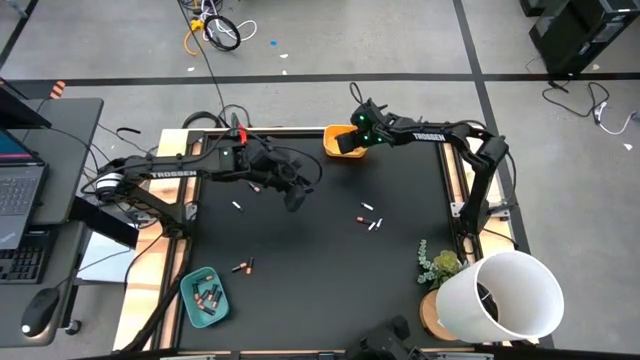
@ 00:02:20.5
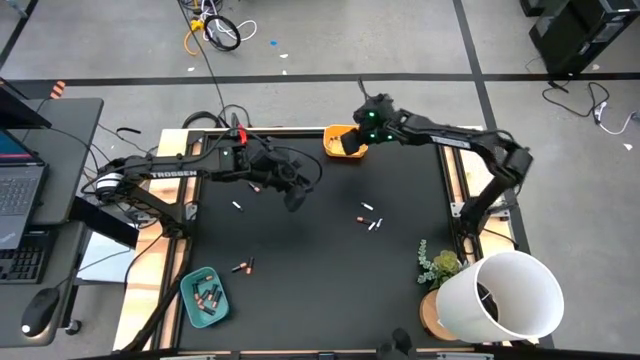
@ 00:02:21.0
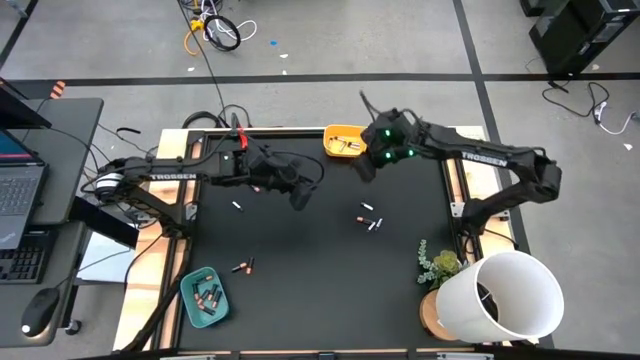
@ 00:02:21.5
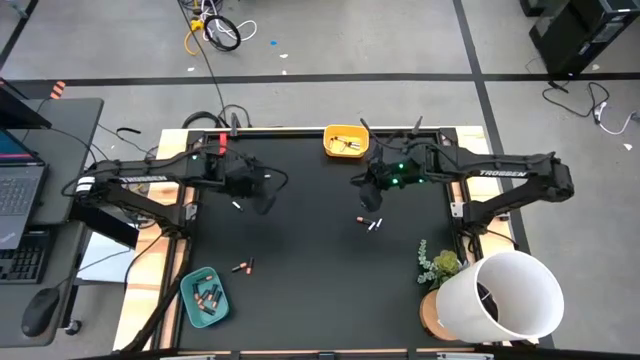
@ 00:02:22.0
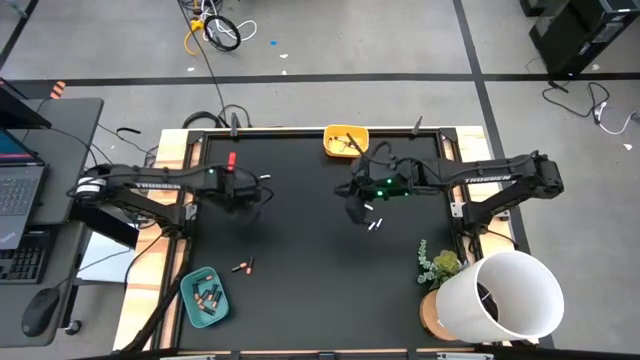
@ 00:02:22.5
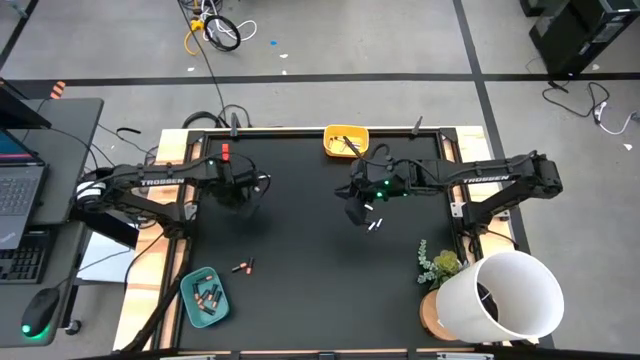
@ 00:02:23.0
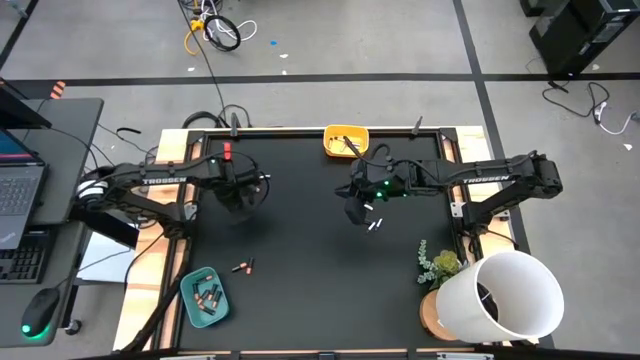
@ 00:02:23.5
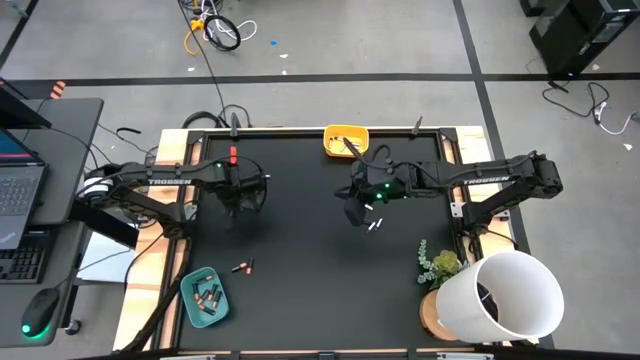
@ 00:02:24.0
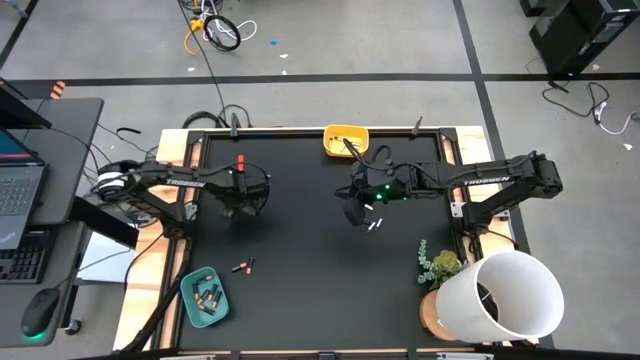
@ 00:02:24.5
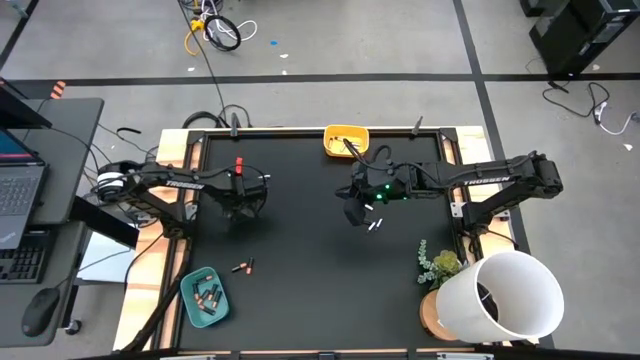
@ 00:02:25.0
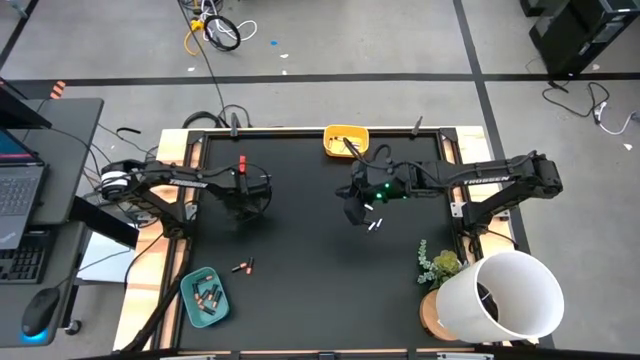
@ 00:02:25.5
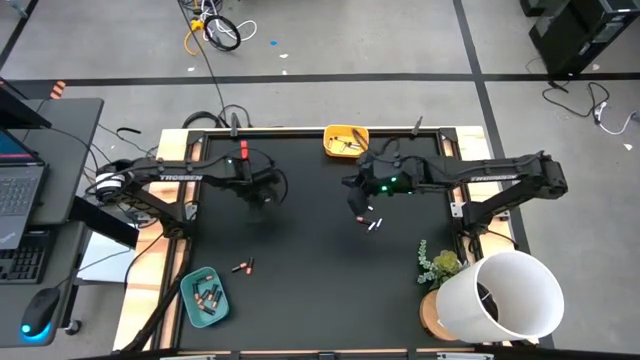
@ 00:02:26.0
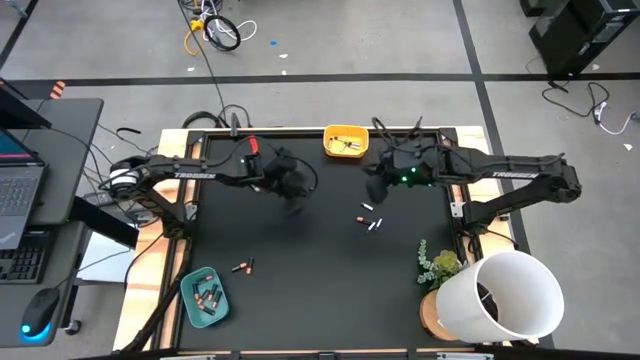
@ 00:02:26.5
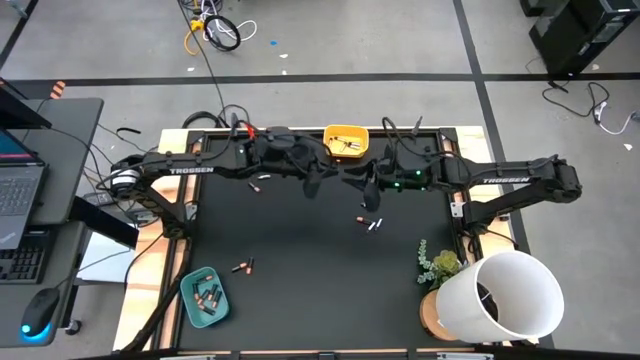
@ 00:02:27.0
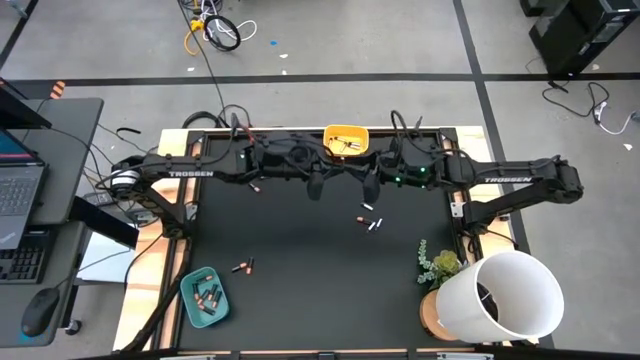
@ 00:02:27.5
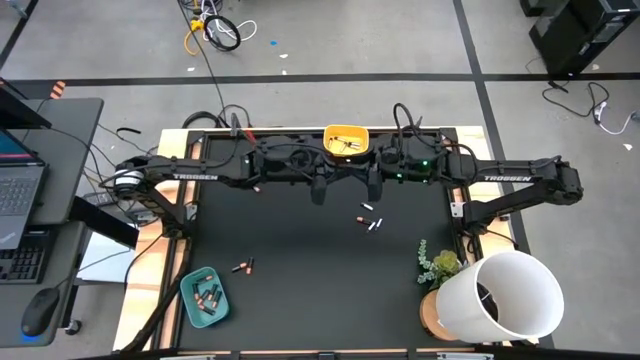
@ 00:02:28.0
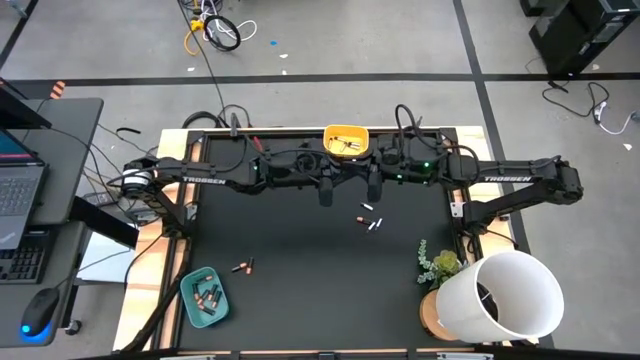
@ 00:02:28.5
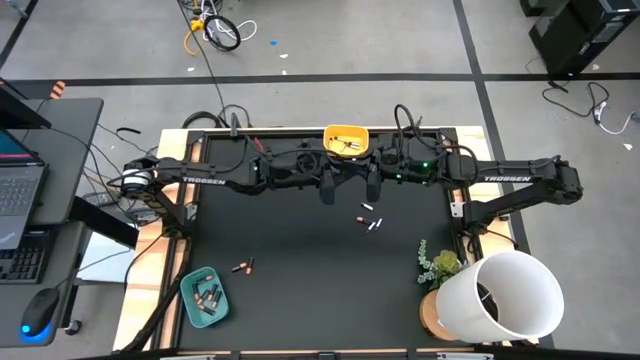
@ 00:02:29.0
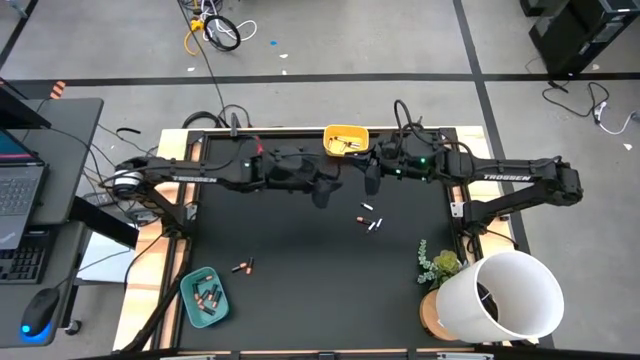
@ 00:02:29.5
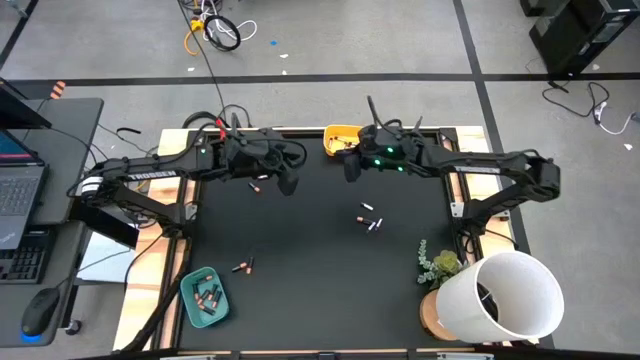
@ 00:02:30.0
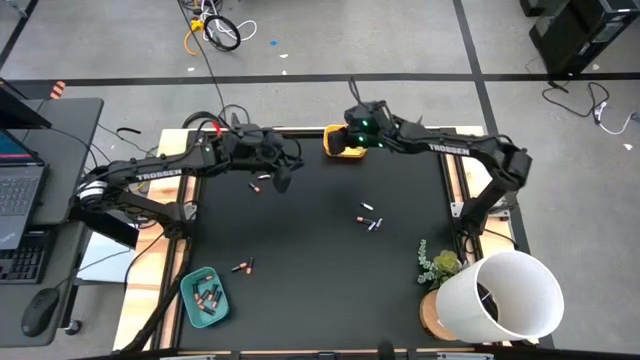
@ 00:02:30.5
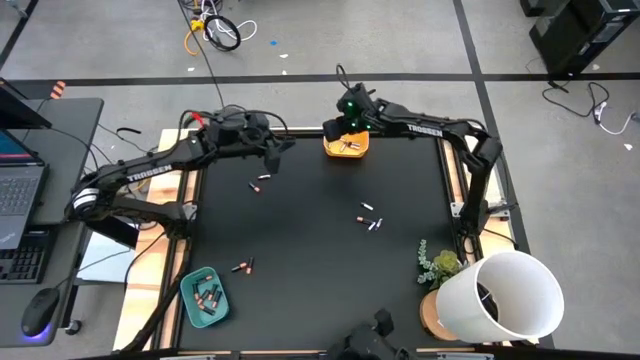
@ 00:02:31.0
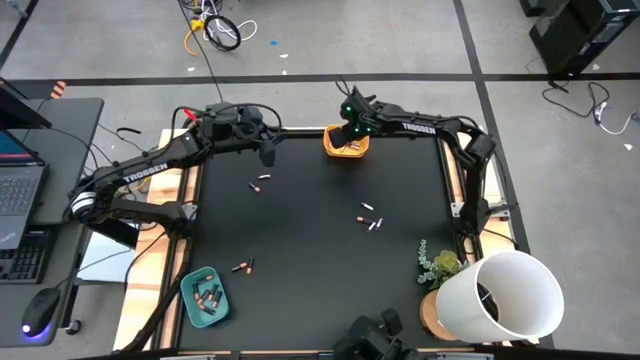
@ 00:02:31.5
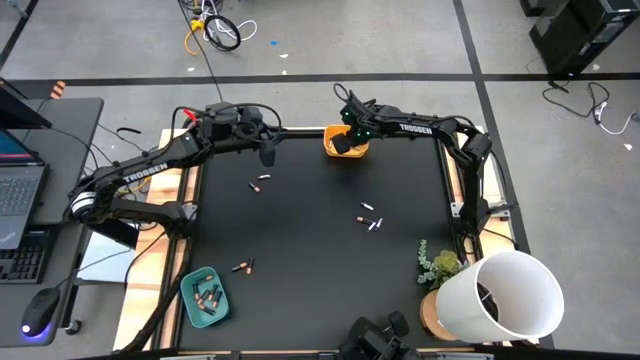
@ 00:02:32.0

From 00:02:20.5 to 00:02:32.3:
Task: Sort batteries
Put the silver battery into the yellow bin

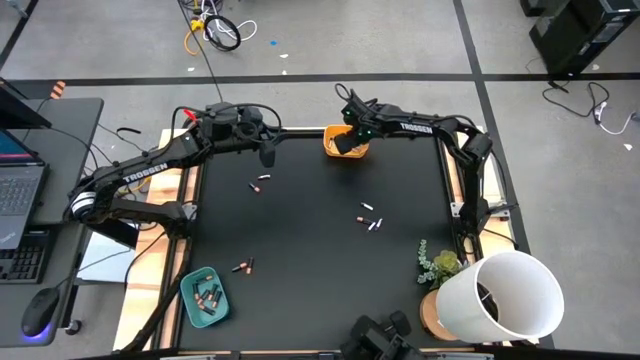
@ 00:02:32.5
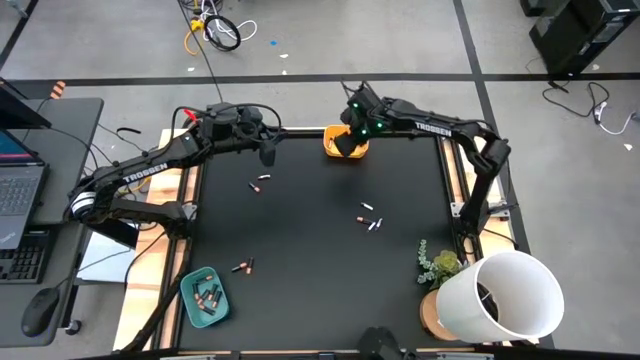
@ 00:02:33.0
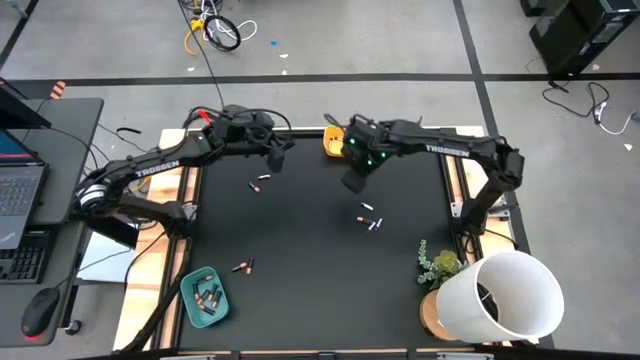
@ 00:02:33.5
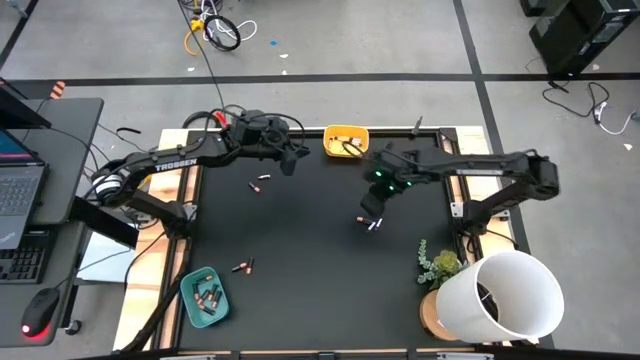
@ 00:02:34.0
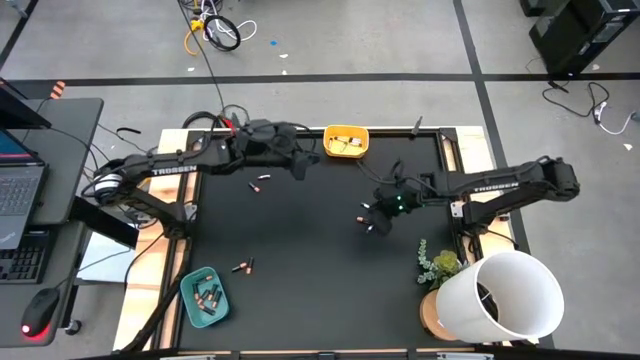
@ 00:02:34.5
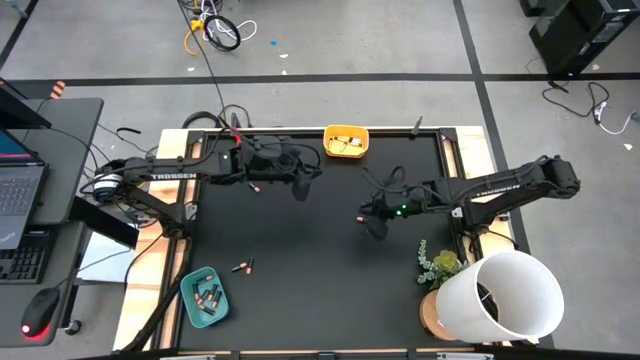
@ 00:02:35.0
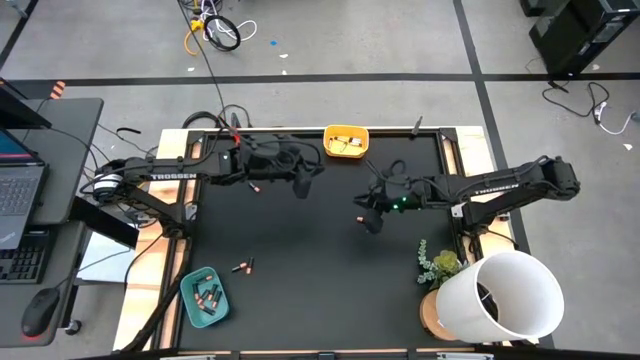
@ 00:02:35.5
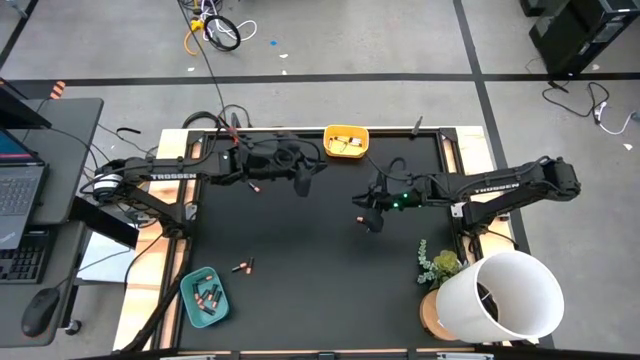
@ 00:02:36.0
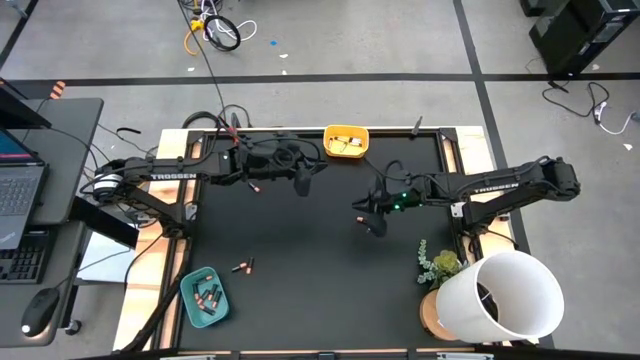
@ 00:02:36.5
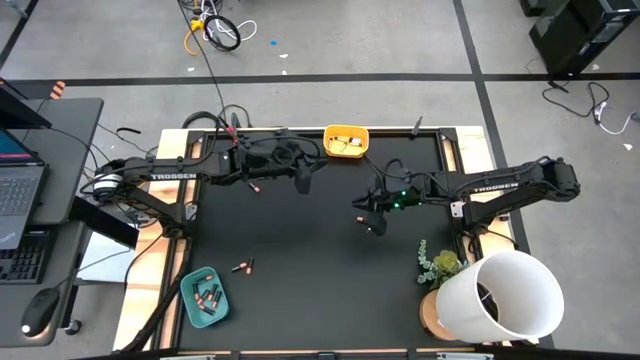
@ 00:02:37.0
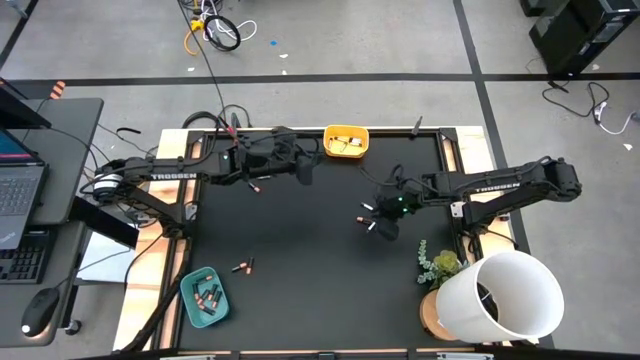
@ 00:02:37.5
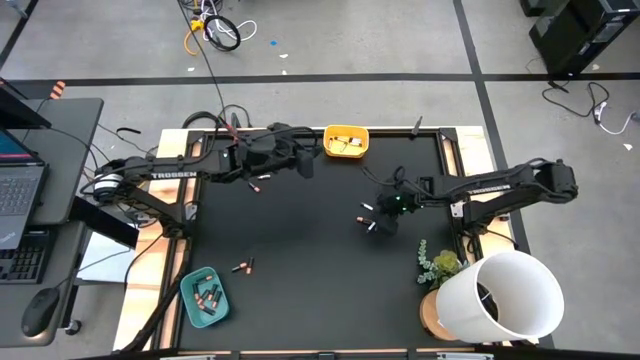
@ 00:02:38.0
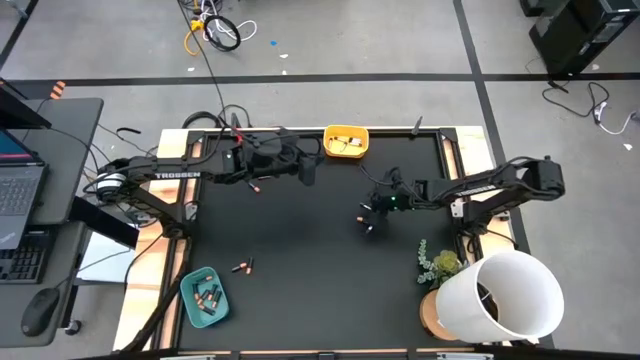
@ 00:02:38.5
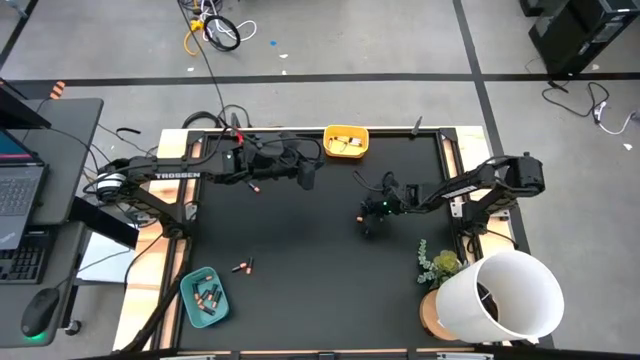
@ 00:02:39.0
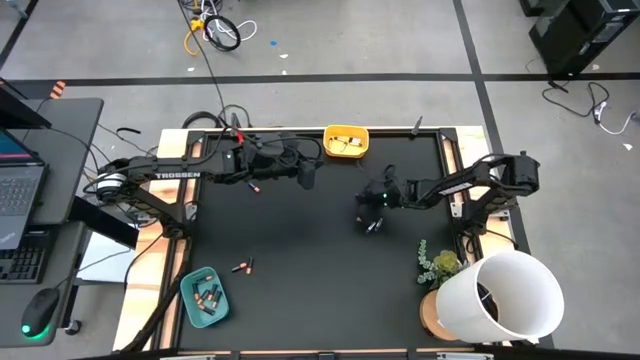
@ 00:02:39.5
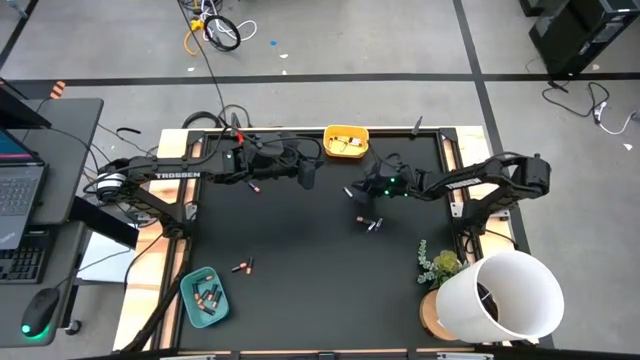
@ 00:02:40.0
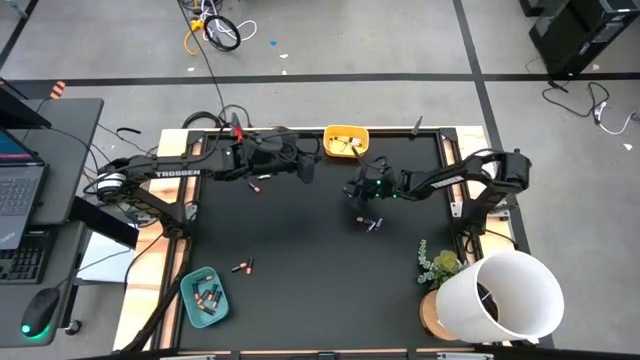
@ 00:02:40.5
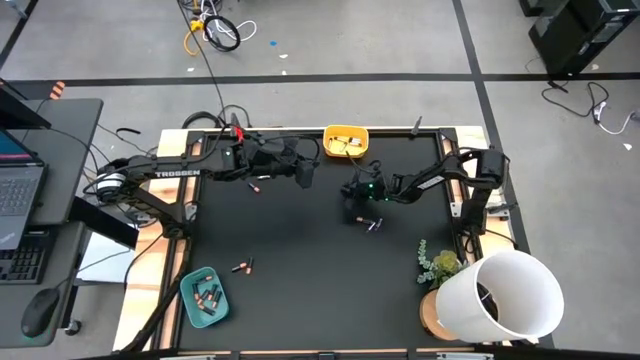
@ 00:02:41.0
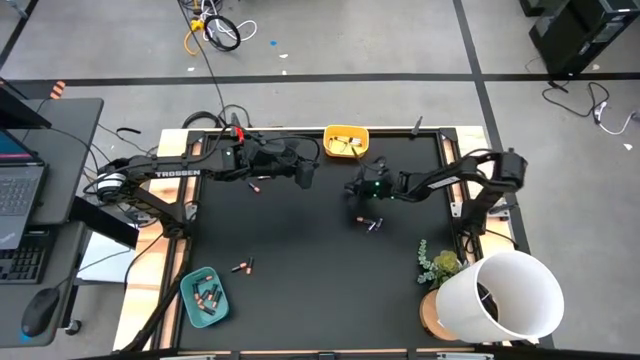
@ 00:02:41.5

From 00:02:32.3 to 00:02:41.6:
Put the silver battery into the yellow bin

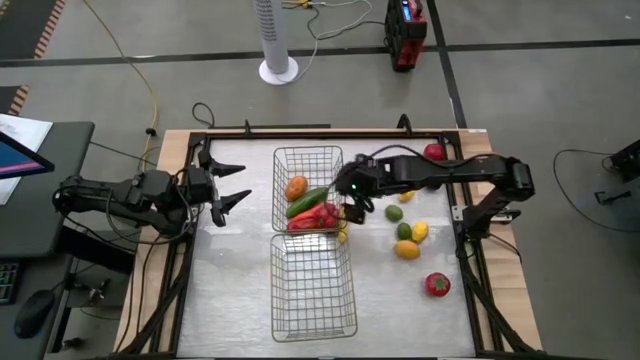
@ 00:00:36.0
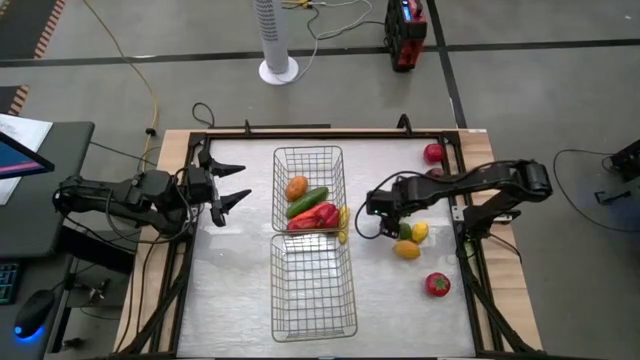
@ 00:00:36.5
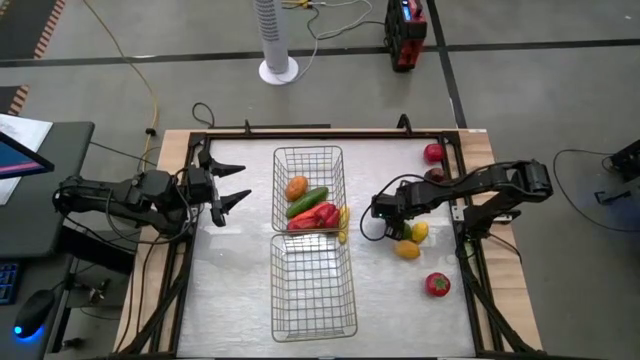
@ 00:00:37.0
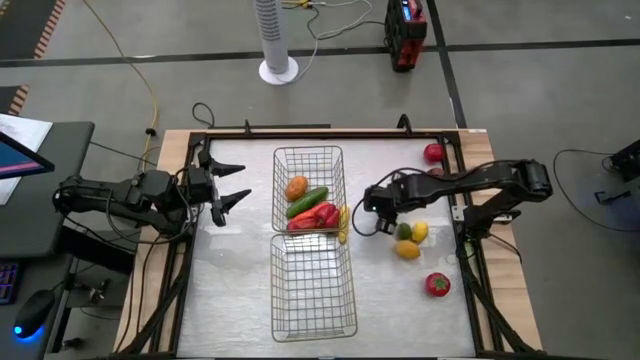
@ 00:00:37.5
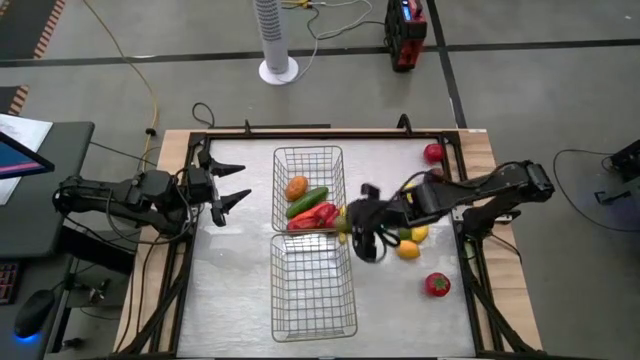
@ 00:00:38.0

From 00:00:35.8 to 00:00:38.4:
Task: Sort produce into baskets
Put the lime into the bottom wire basket
